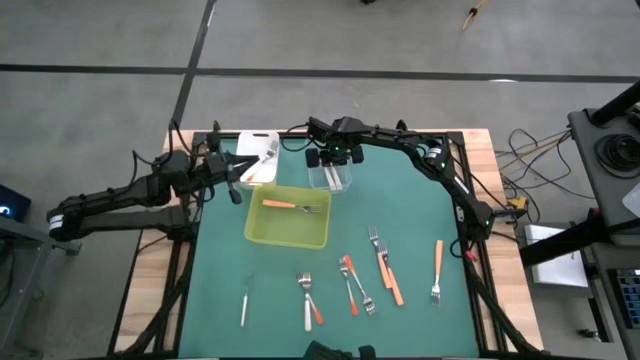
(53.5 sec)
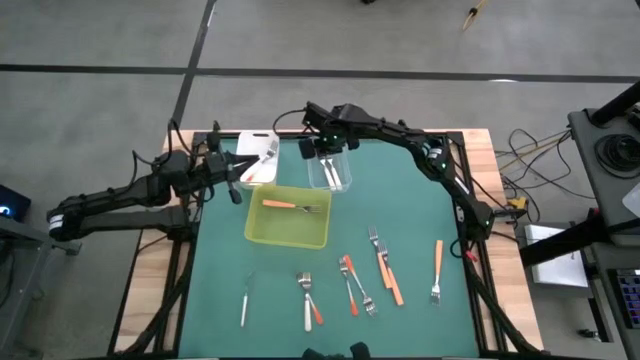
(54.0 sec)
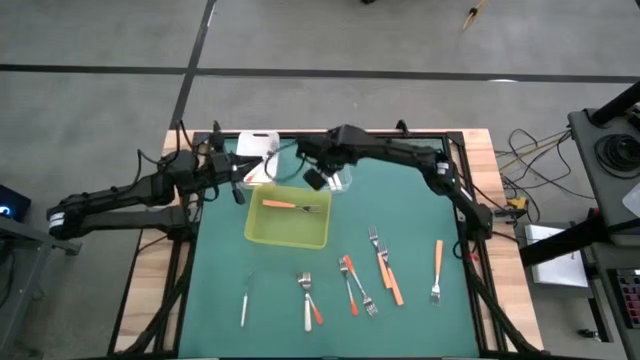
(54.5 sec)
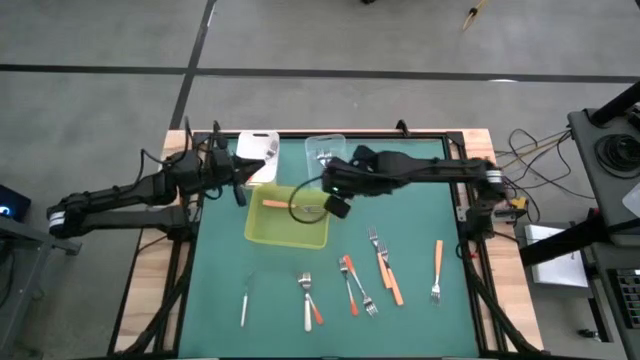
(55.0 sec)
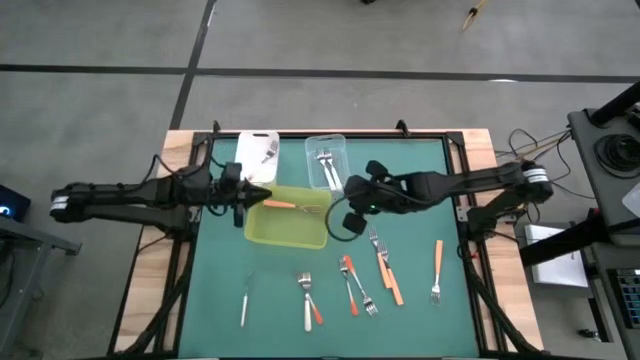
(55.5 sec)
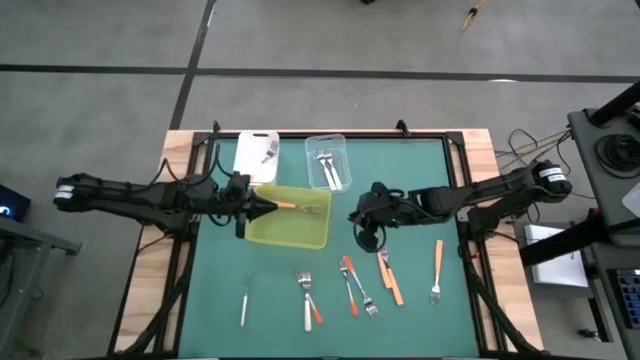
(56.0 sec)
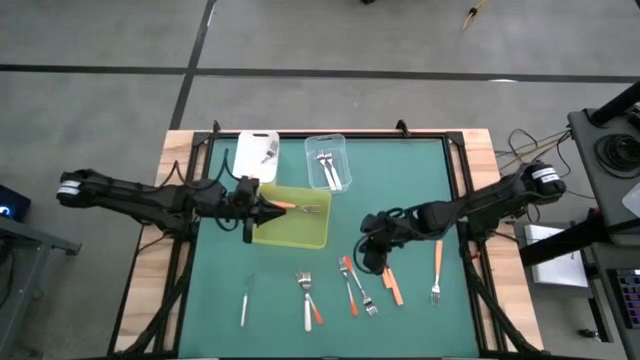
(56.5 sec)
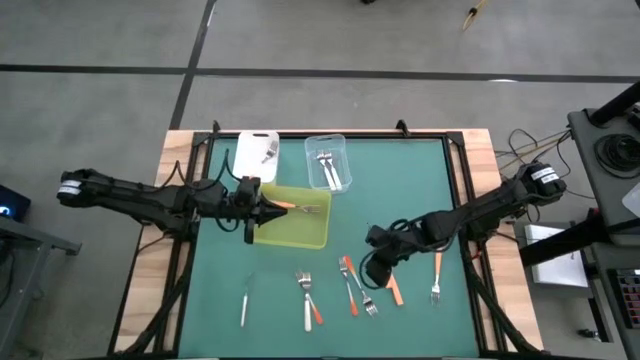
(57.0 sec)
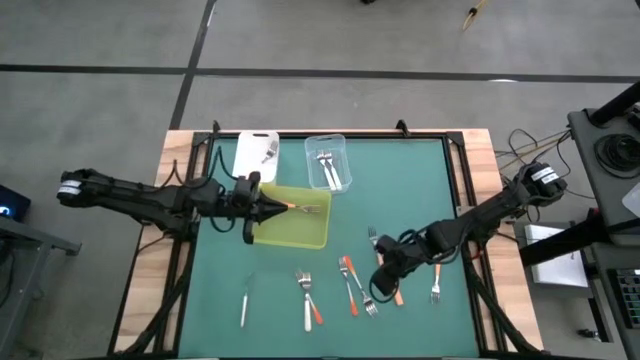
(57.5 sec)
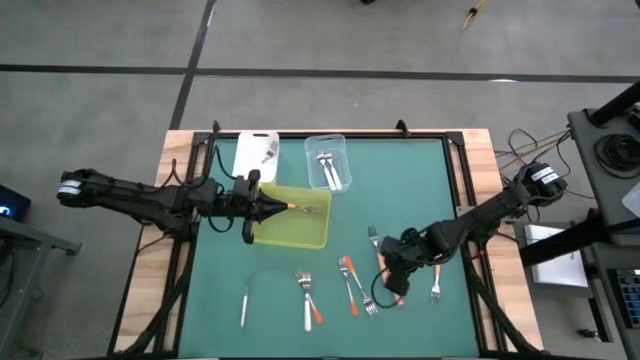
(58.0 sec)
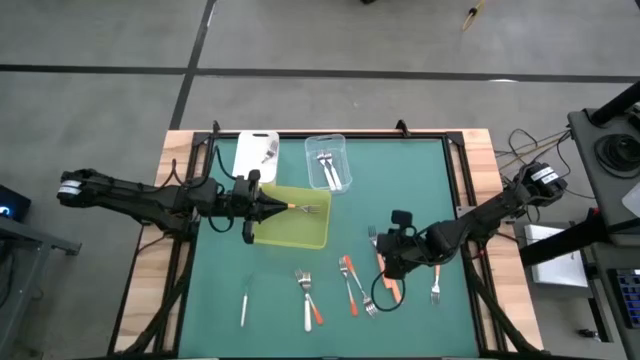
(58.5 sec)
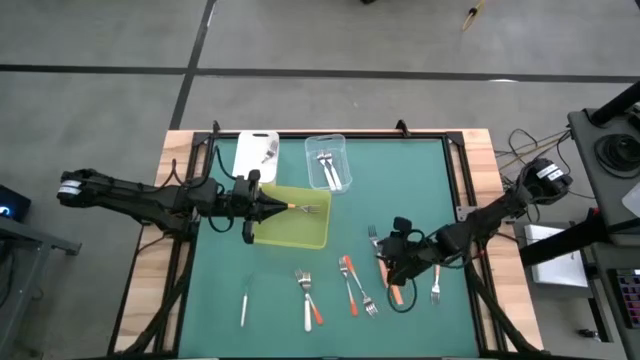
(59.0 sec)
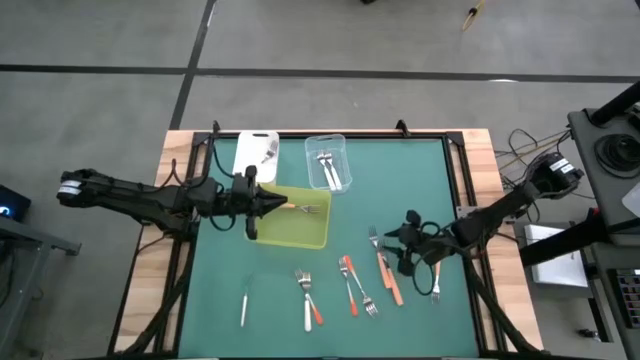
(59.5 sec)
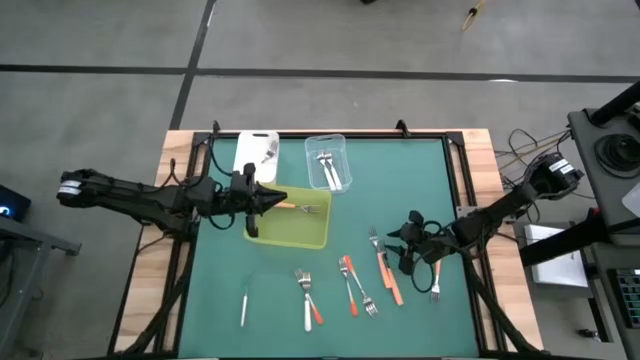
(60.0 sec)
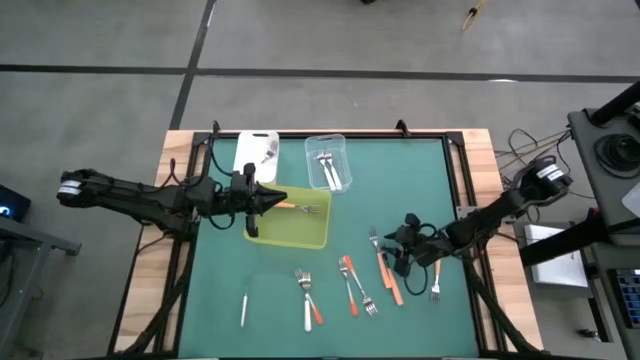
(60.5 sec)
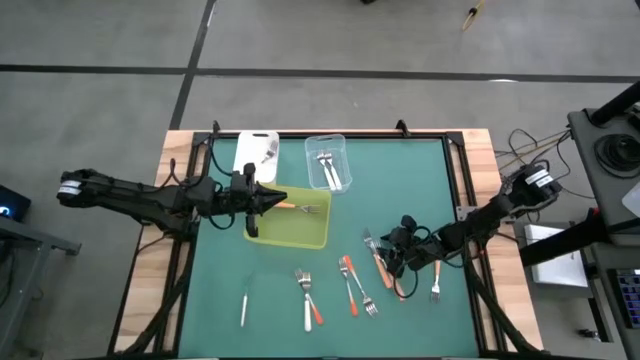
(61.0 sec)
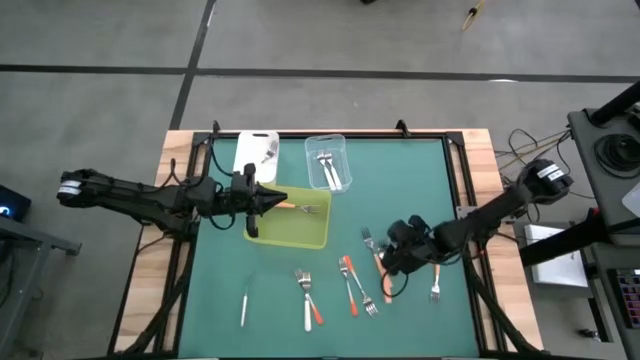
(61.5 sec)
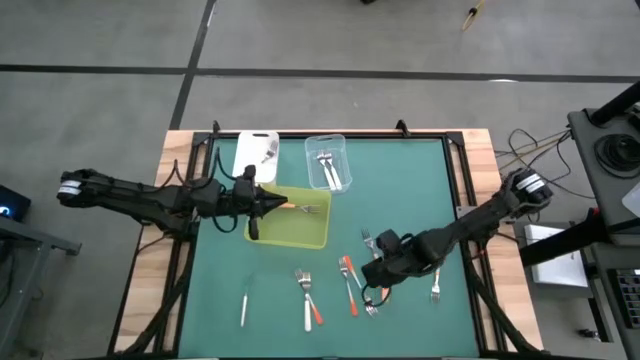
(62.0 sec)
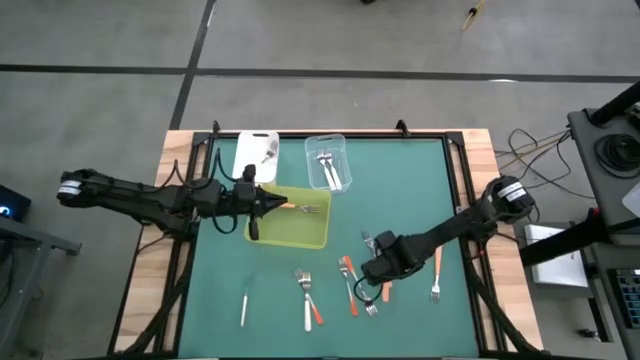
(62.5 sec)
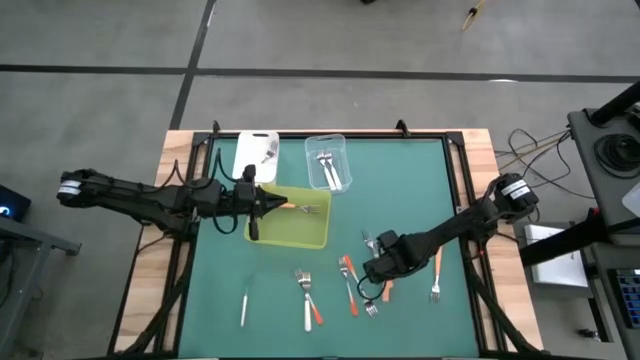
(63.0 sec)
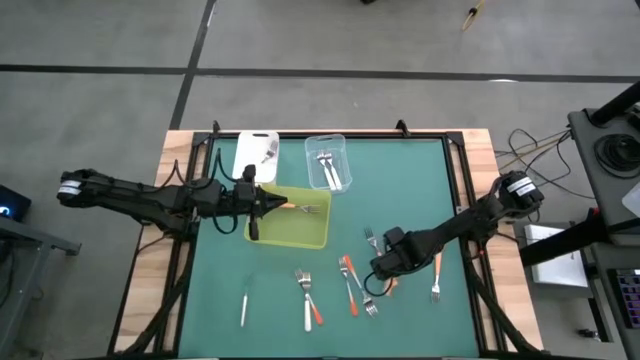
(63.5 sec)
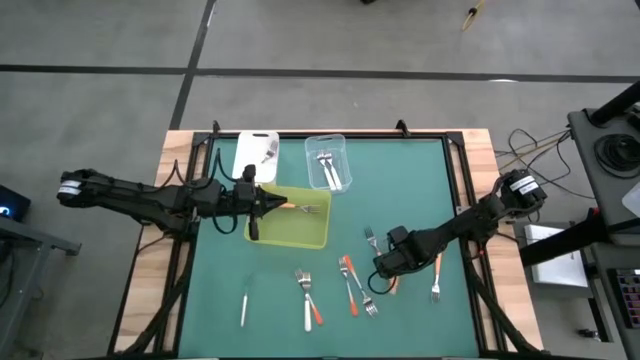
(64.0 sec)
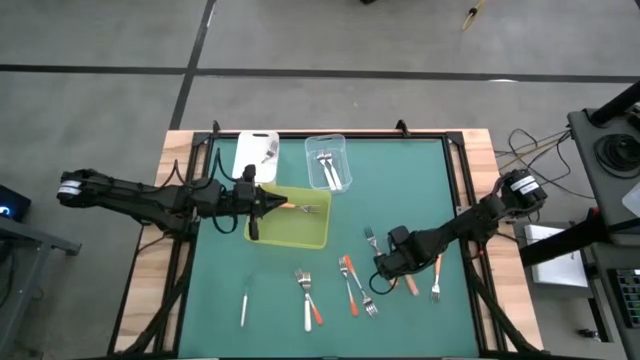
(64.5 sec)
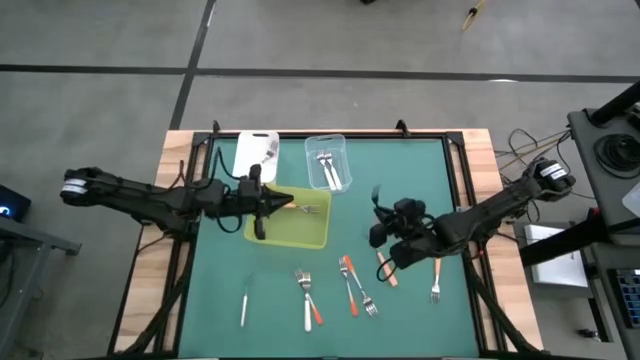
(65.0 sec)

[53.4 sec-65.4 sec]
Task: Sort silverware by color (type)
Put the yellow fork into the yellow bin

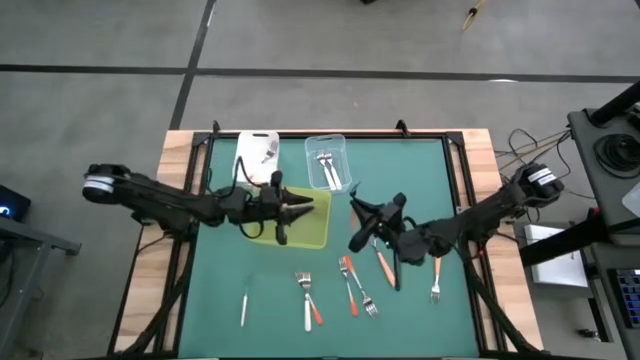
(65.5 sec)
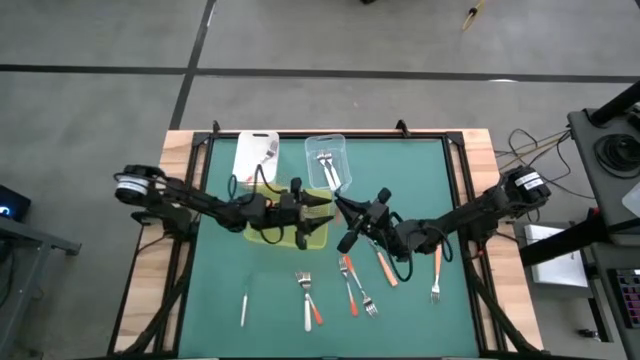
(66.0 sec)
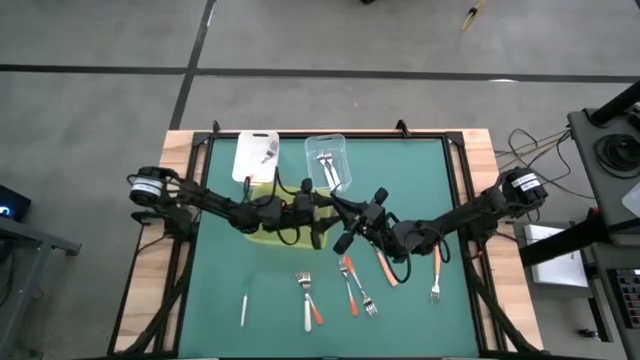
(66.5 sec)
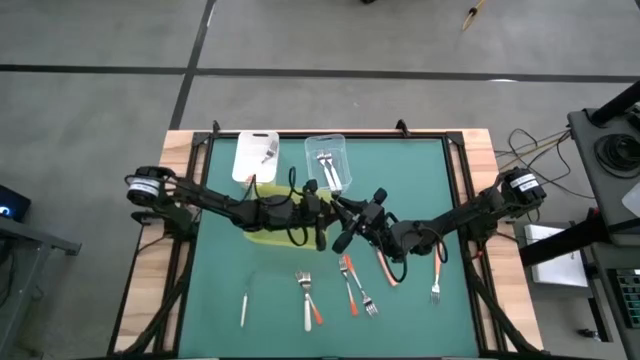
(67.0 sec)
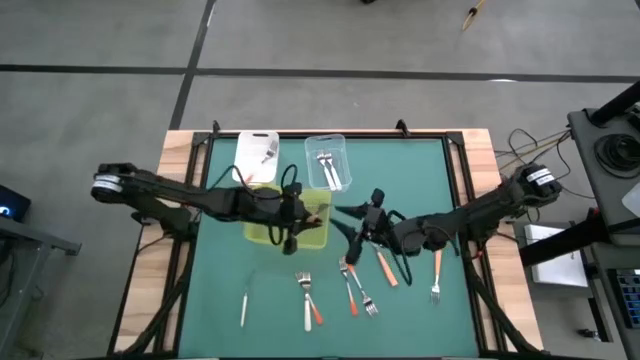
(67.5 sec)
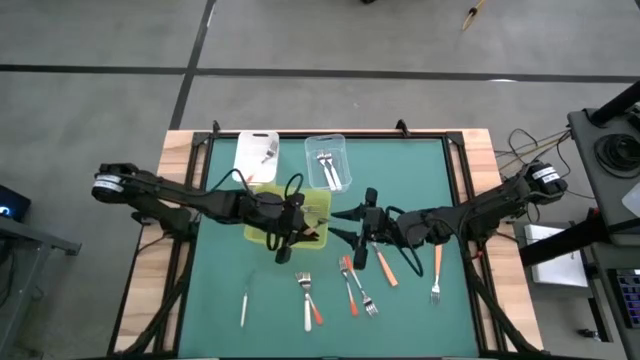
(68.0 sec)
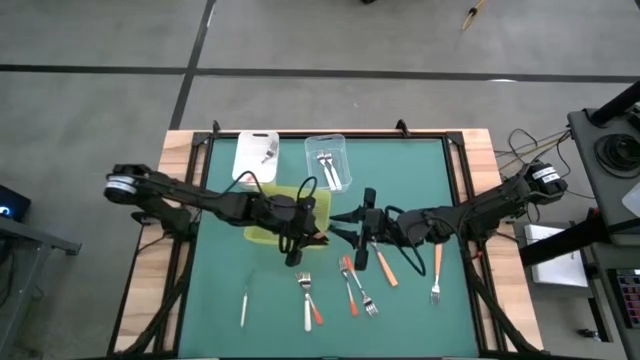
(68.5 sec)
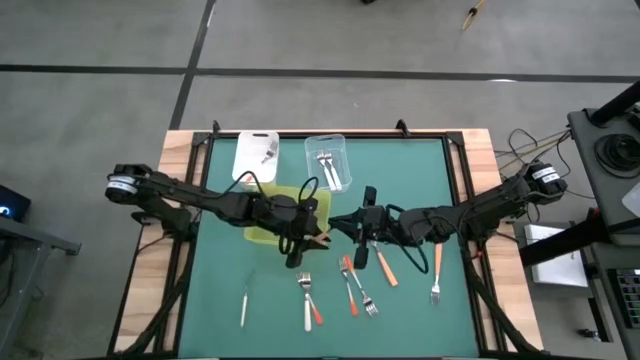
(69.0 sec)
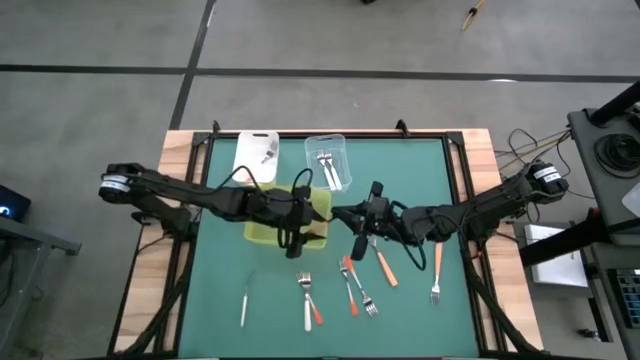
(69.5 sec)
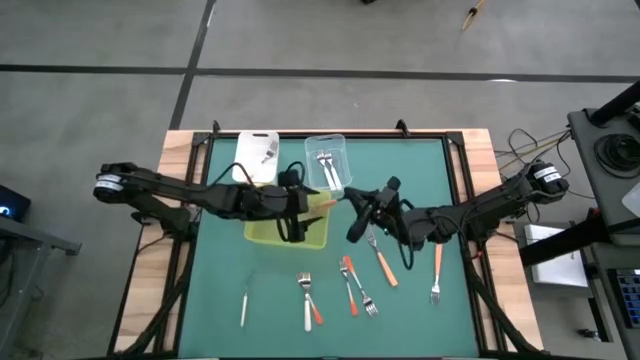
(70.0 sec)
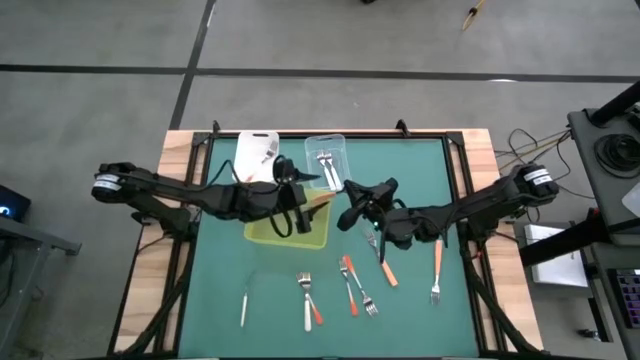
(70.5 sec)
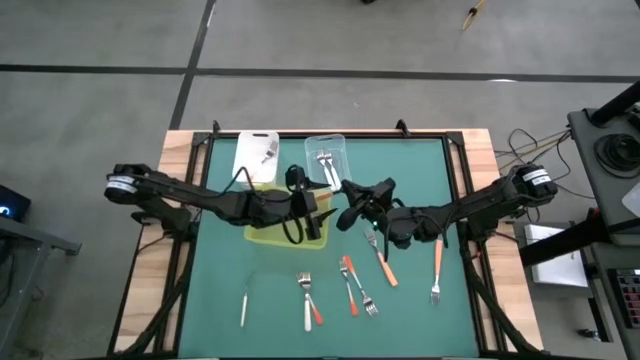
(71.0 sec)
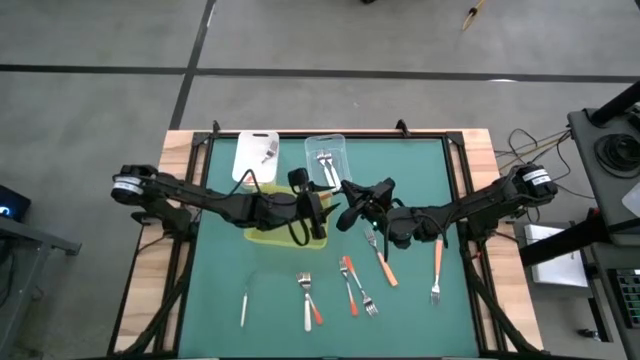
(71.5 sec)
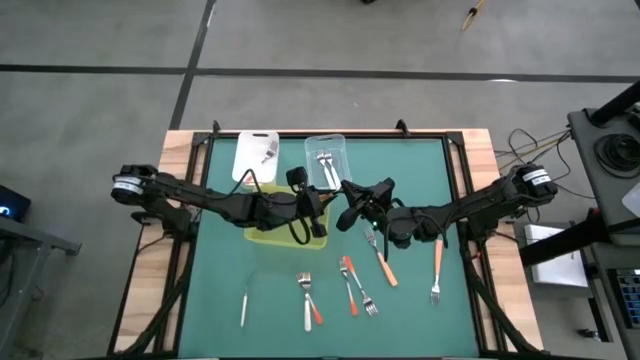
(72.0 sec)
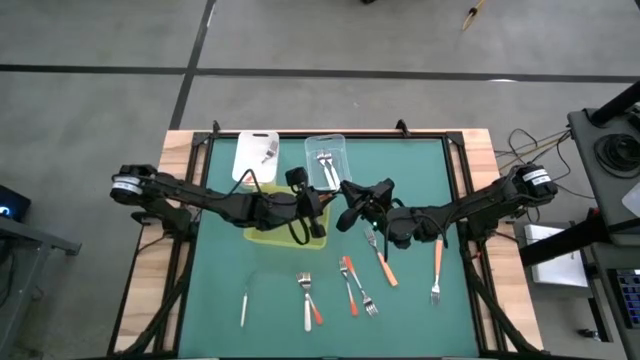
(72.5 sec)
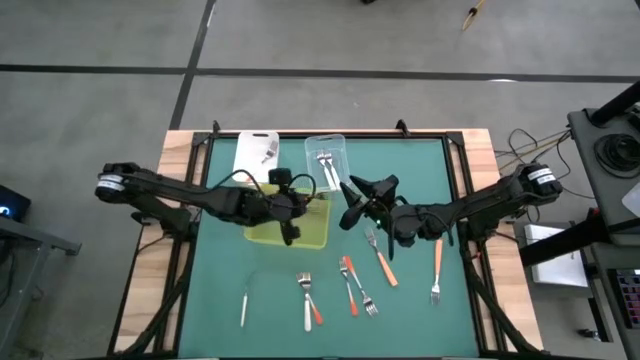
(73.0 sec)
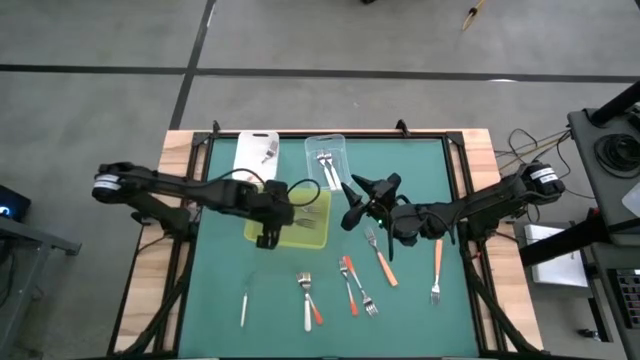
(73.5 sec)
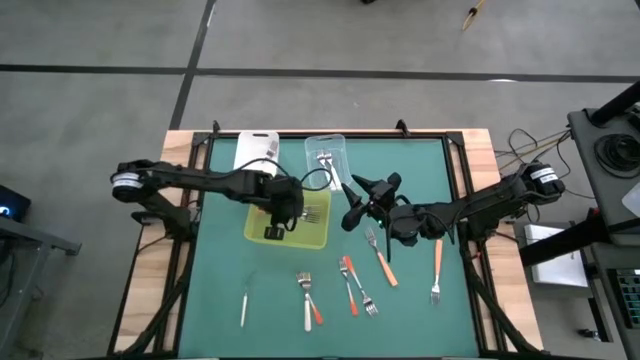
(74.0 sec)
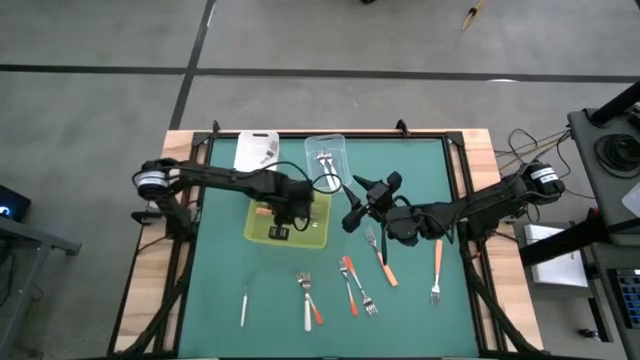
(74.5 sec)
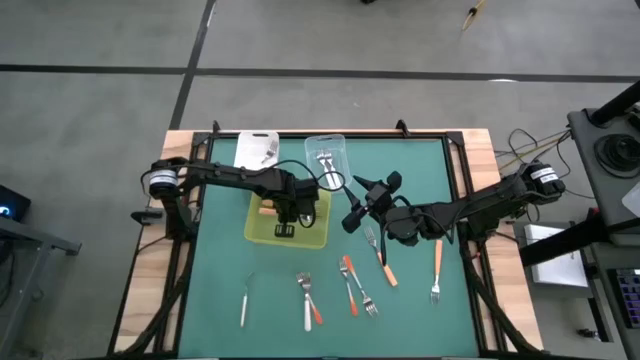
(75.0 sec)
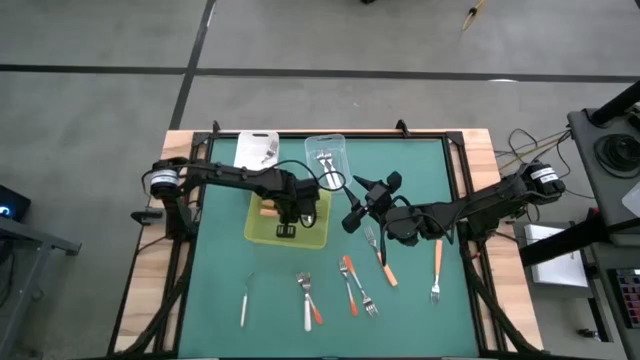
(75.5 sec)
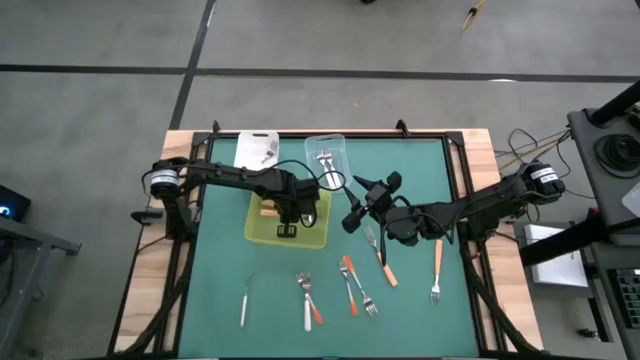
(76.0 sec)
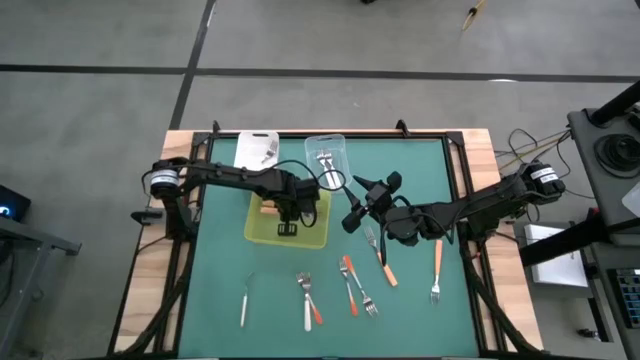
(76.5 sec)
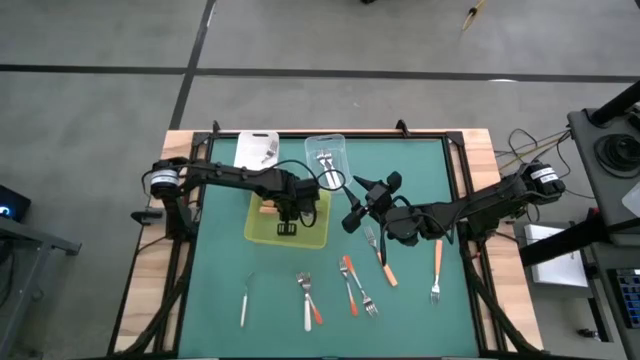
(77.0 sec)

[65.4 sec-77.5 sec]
Put the yellow fork into the yellow bin
